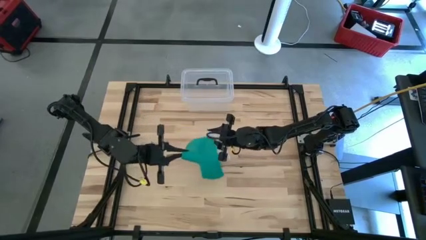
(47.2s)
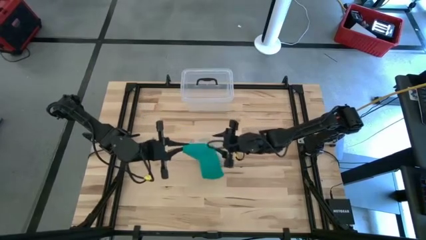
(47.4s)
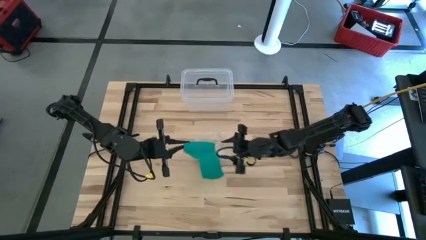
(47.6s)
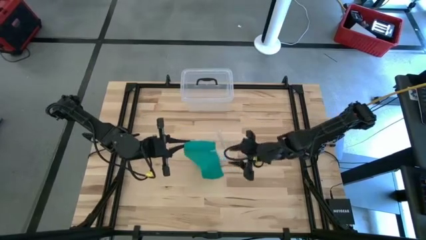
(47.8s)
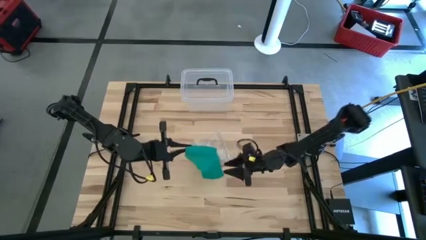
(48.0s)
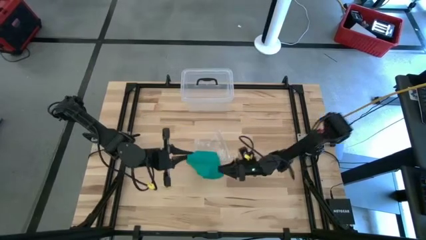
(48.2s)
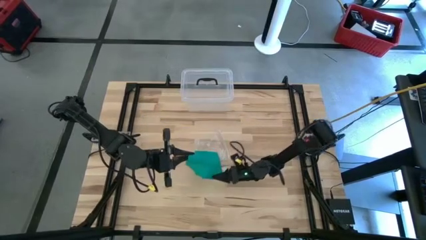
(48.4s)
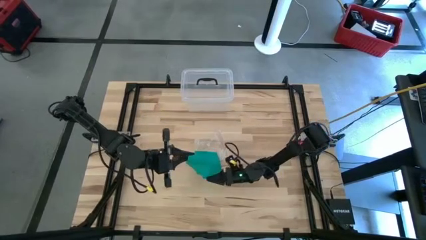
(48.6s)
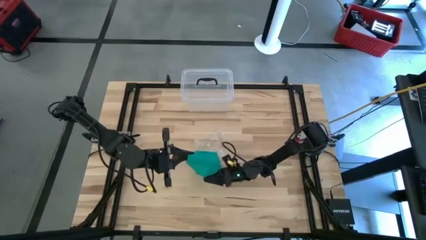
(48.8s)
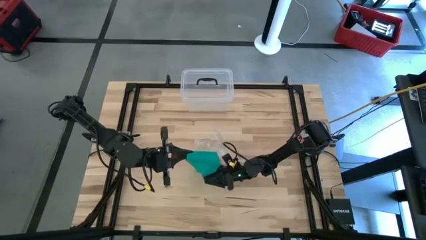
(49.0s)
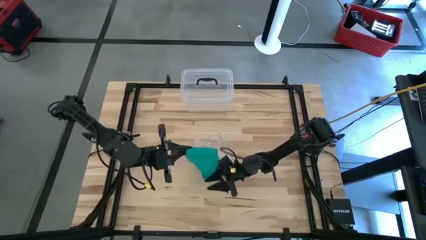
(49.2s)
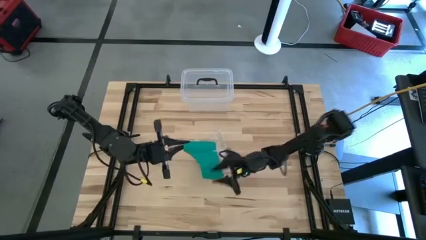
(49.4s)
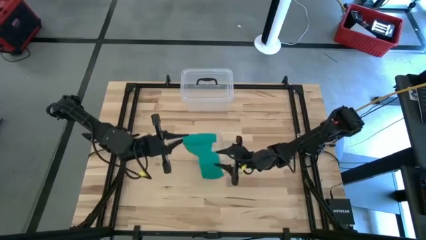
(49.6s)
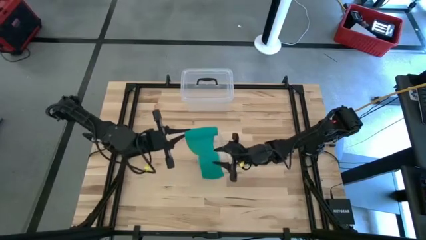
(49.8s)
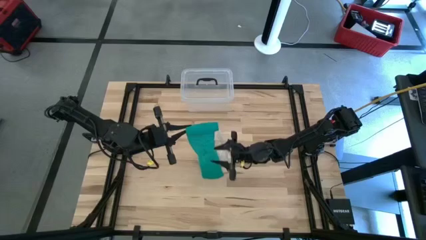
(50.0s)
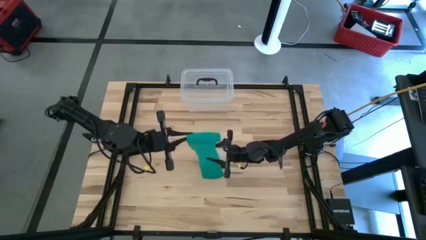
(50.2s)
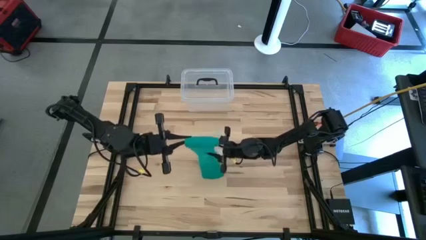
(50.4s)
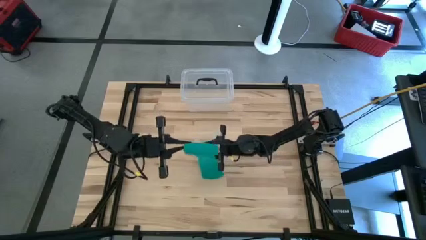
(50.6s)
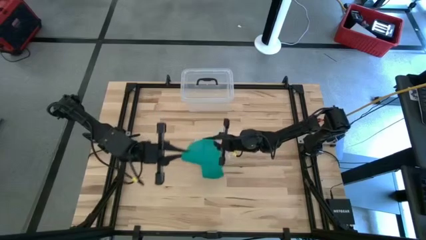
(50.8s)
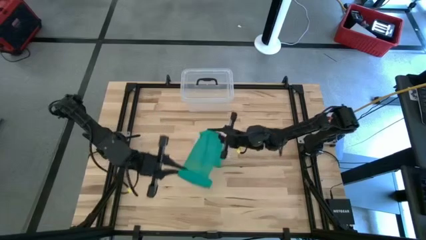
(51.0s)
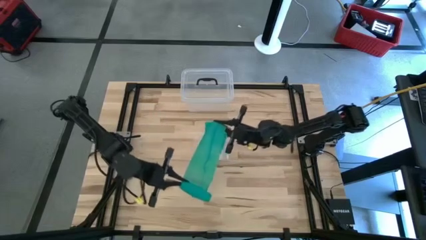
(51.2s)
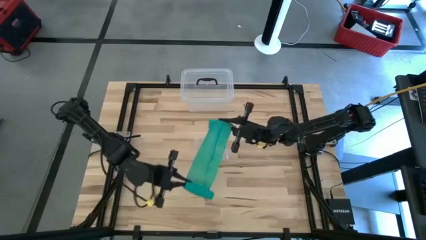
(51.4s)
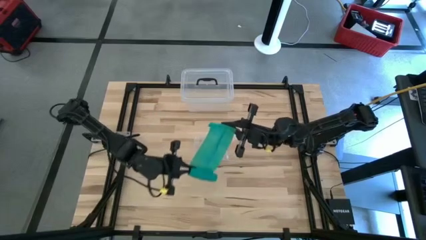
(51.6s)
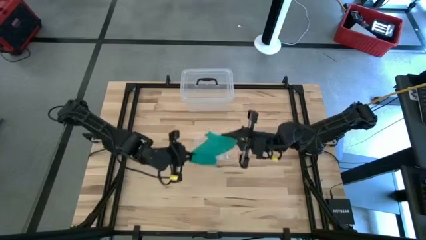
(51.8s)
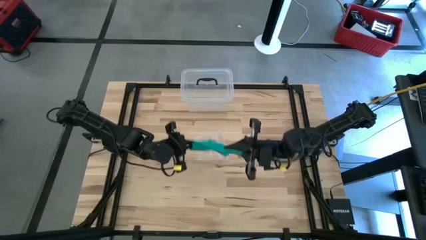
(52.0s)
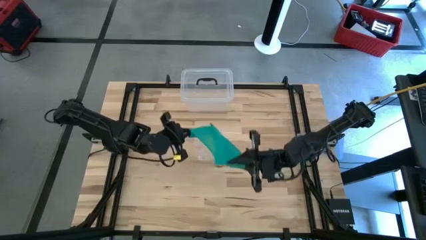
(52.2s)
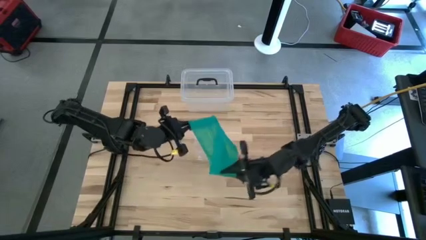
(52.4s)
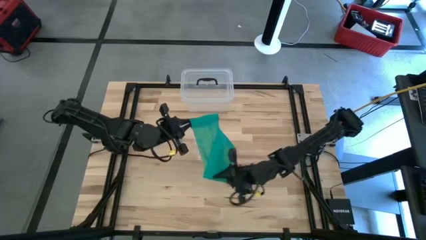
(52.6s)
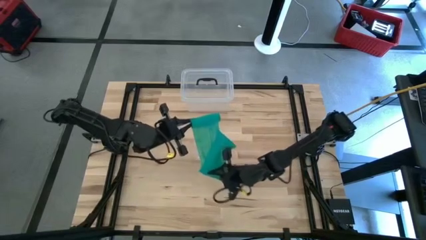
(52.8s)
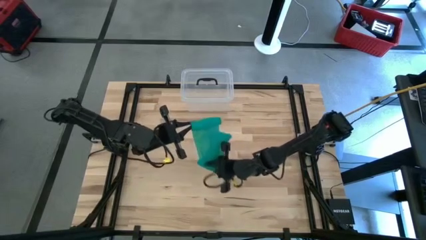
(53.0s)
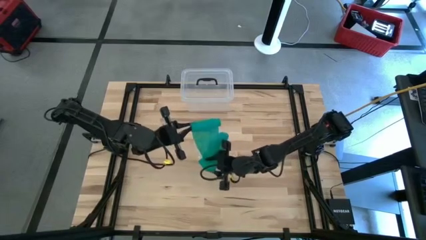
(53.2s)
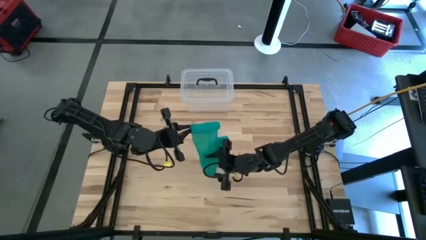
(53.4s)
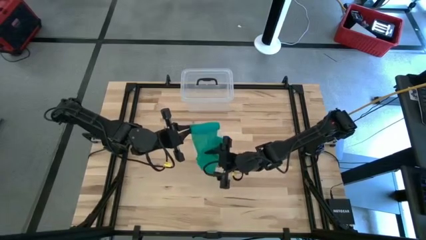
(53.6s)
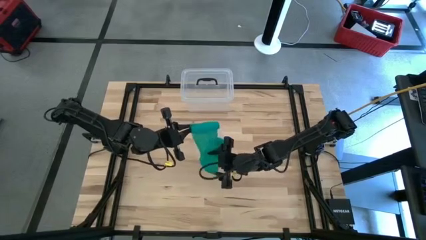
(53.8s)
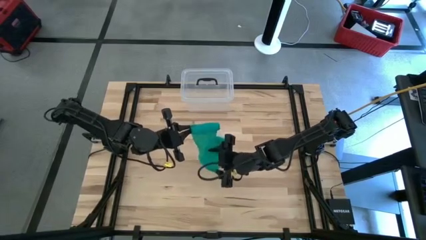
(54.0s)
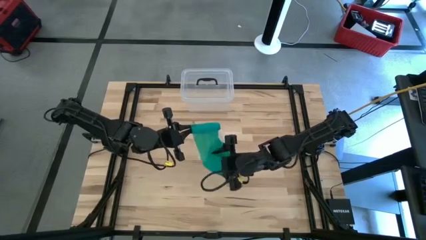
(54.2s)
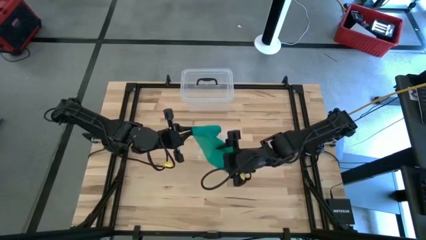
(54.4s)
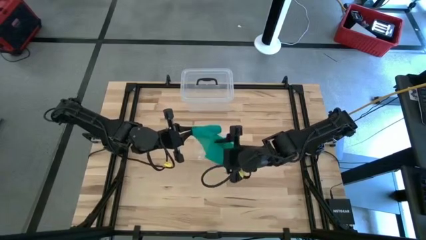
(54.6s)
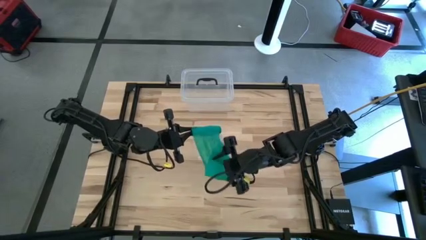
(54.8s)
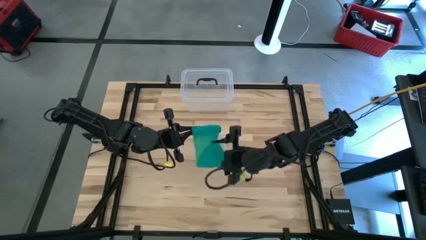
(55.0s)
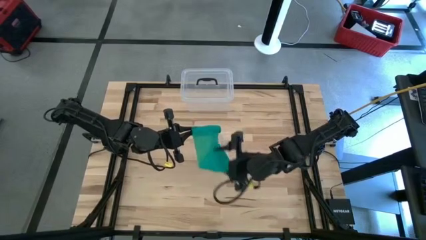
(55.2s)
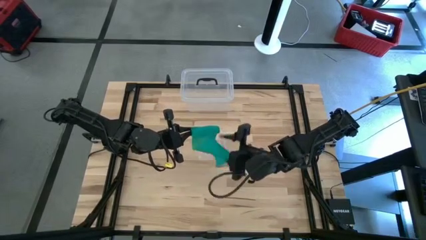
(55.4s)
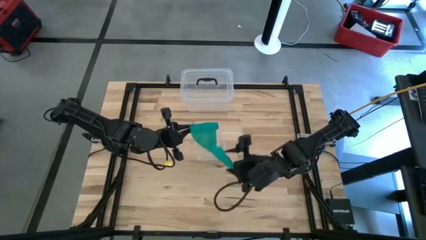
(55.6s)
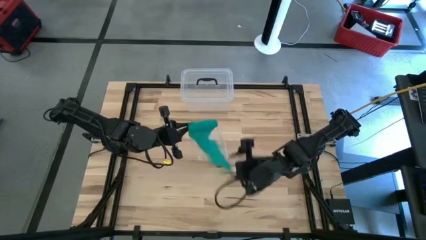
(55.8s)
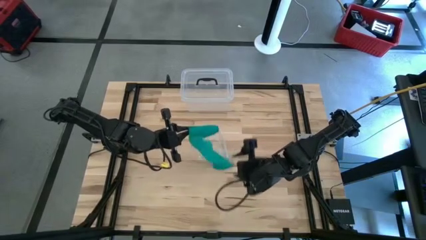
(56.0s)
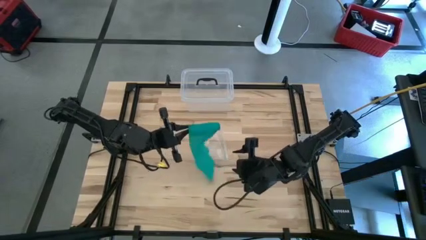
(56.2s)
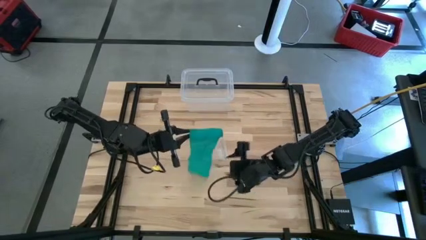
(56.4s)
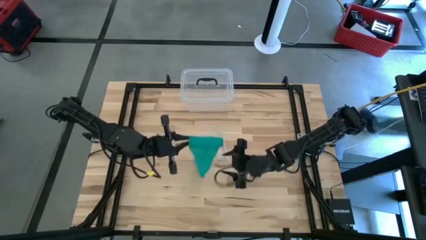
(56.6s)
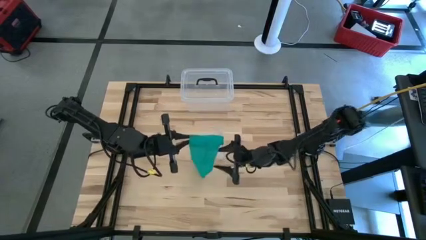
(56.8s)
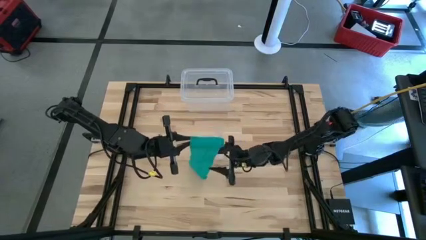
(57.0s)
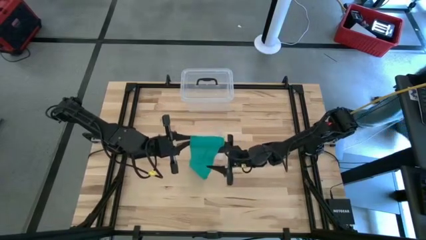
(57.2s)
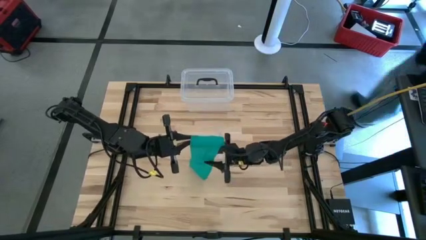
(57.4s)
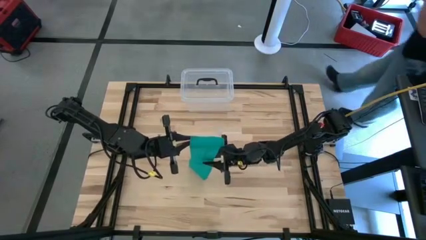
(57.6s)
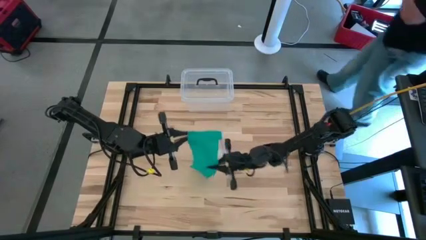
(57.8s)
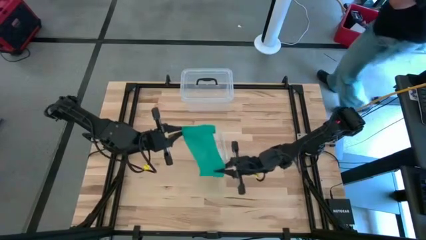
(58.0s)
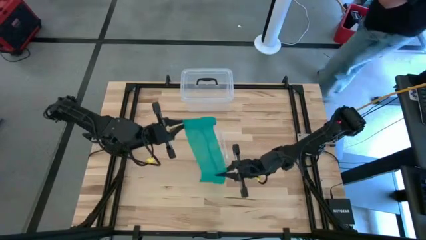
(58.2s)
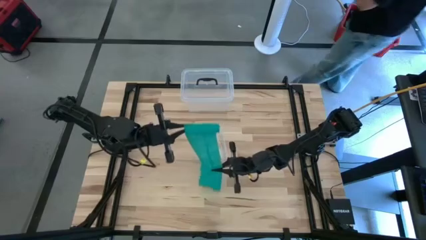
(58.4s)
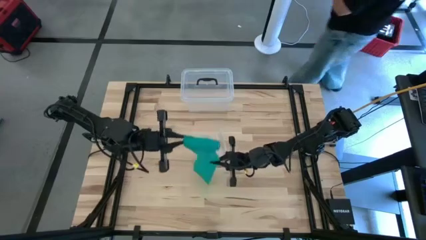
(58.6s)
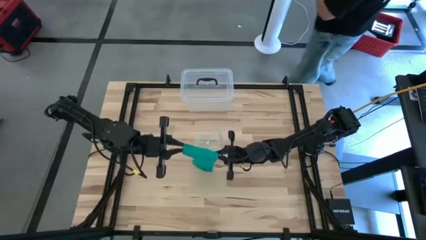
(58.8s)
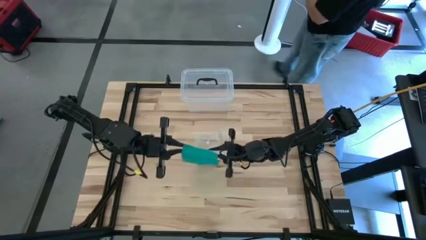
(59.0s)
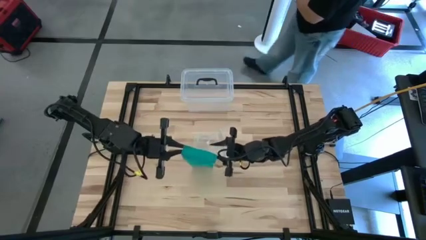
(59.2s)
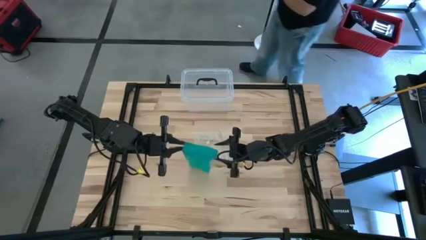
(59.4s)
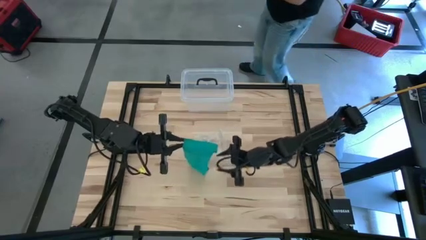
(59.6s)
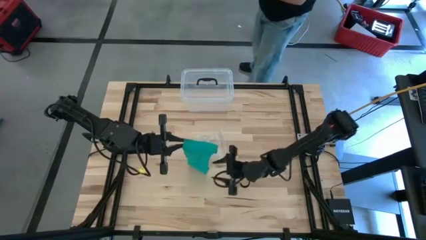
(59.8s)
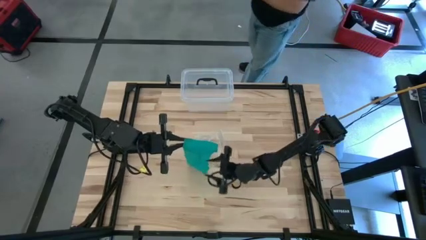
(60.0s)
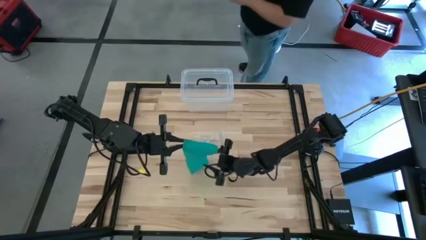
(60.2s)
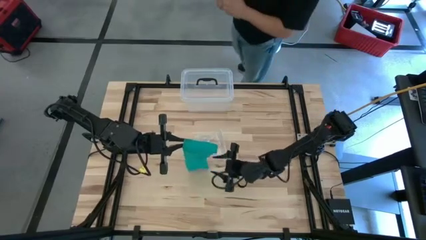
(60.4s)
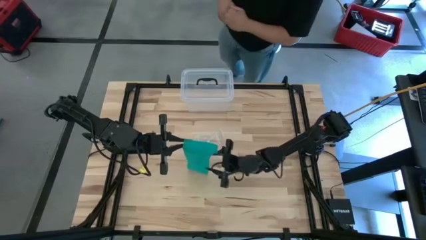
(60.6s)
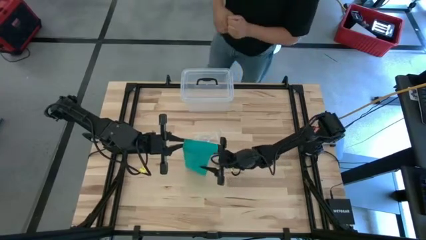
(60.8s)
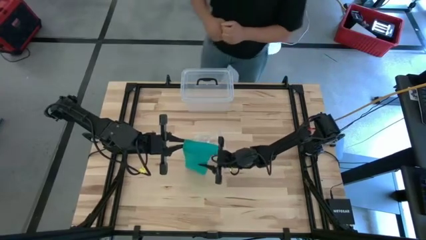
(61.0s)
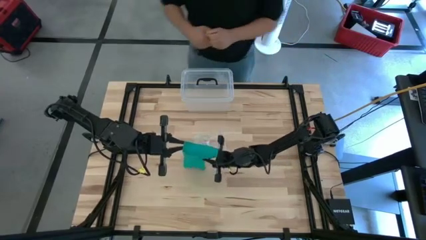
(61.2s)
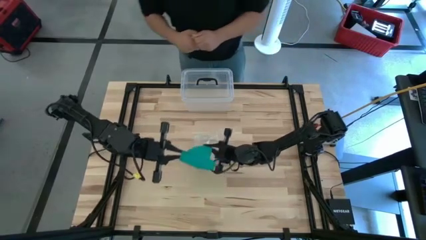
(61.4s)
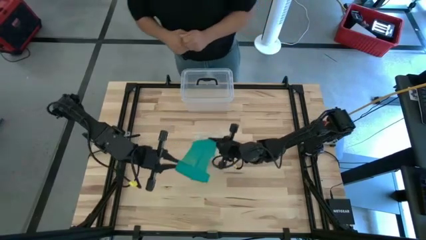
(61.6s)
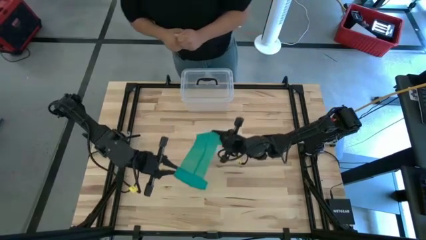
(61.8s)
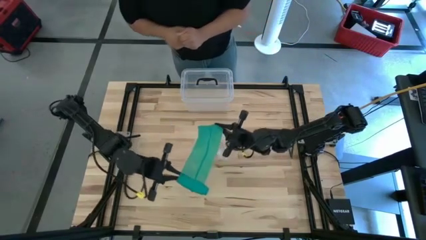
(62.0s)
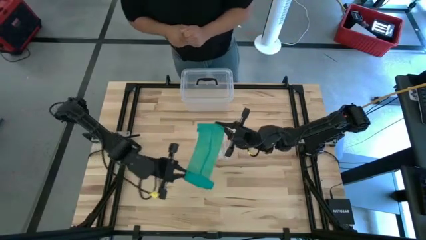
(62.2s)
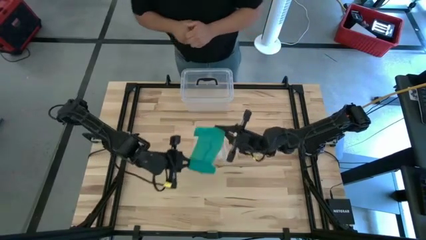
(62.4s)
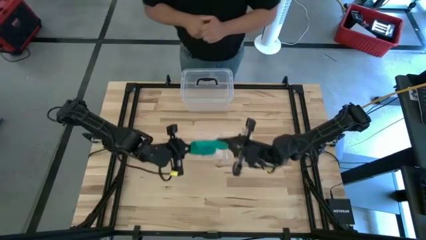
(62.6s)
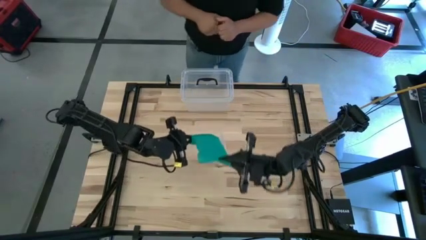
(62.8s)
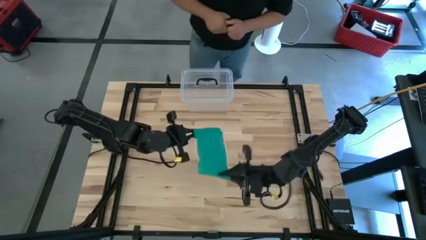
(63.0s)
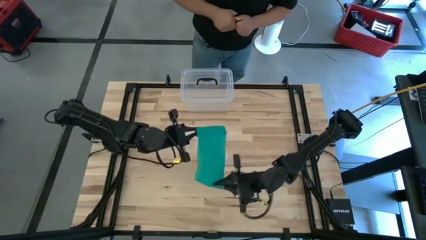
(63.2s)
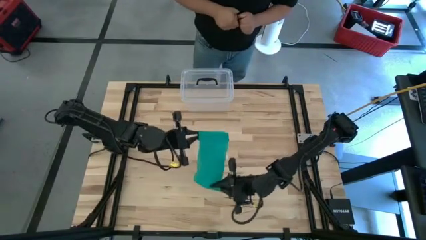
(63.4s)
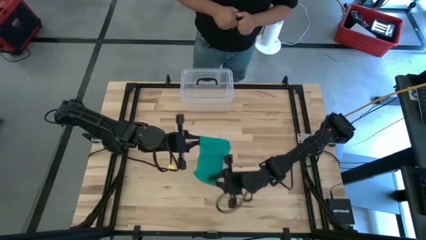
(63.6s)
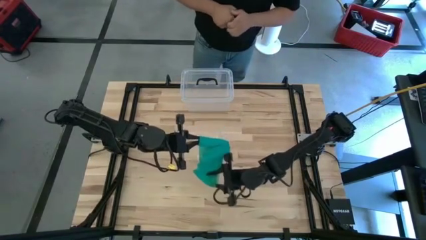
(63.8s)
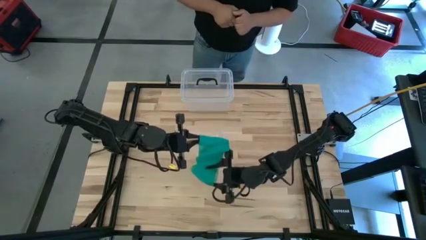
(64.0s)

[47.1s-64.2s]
Task: Roll bandage
Roll the green bandage
